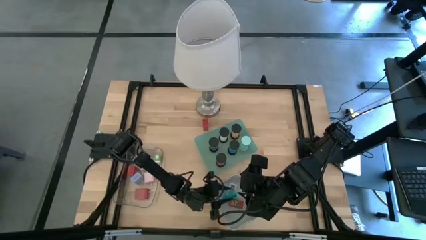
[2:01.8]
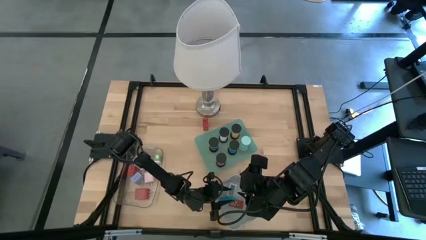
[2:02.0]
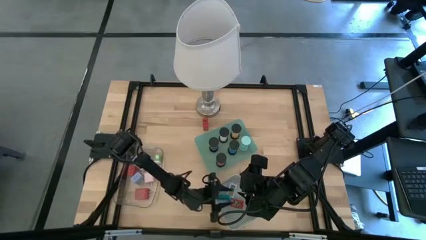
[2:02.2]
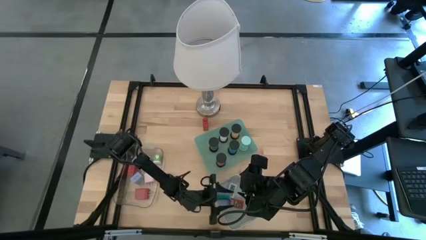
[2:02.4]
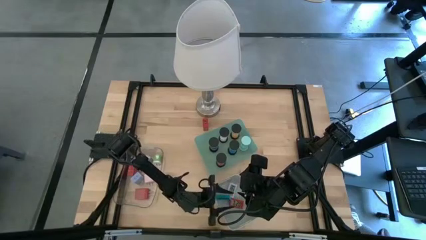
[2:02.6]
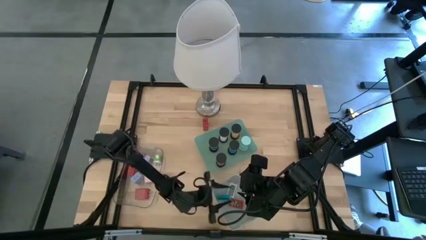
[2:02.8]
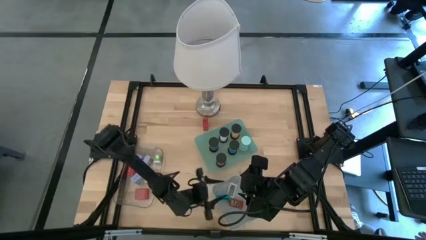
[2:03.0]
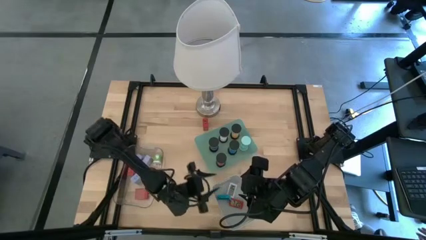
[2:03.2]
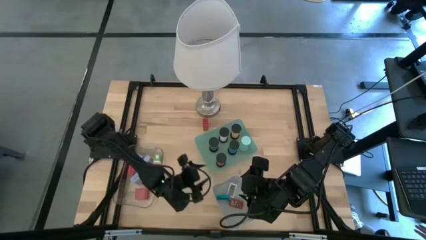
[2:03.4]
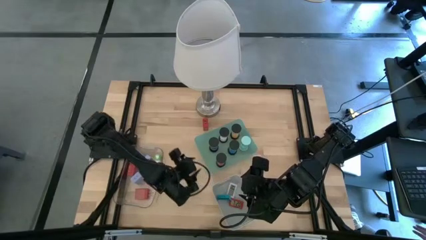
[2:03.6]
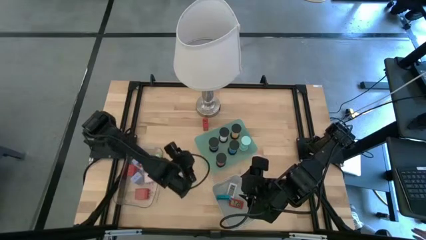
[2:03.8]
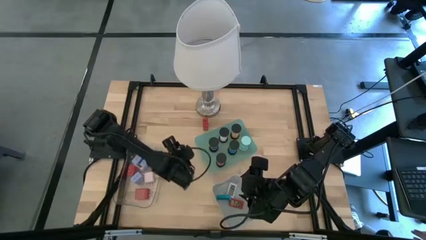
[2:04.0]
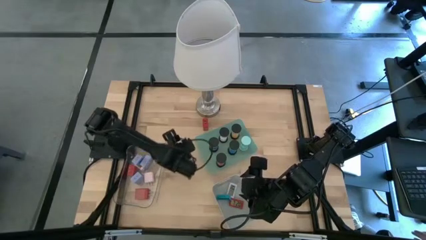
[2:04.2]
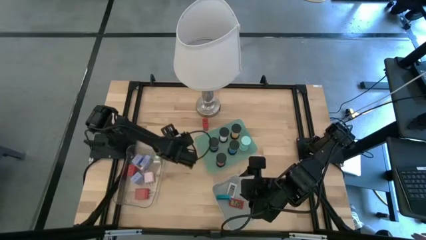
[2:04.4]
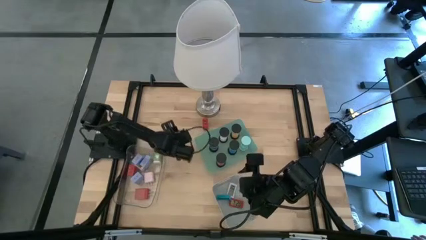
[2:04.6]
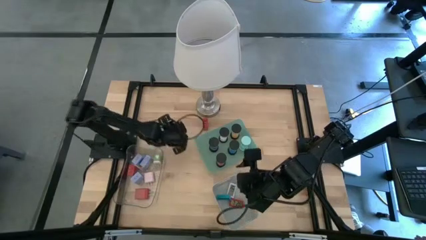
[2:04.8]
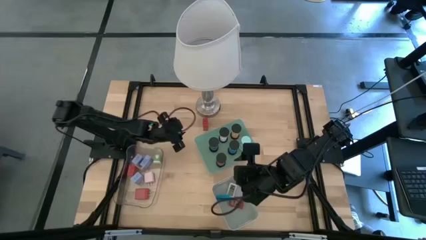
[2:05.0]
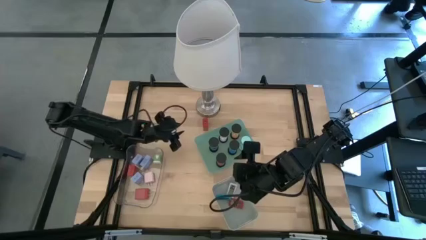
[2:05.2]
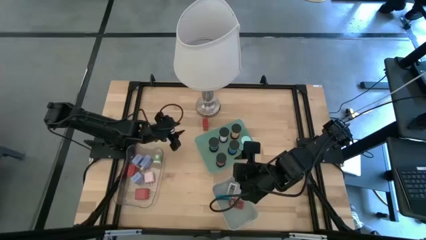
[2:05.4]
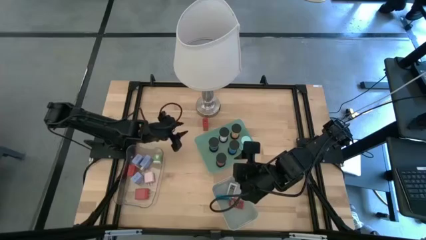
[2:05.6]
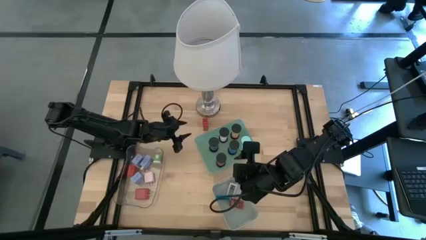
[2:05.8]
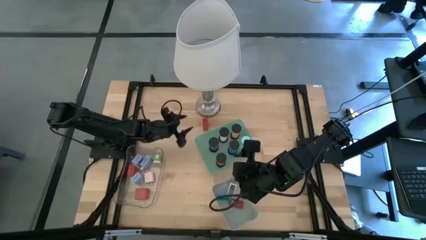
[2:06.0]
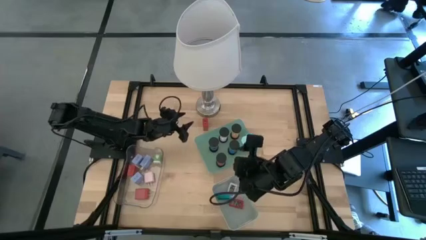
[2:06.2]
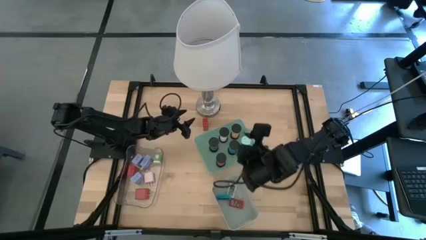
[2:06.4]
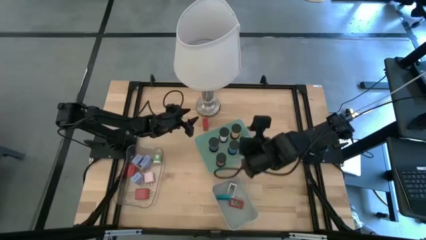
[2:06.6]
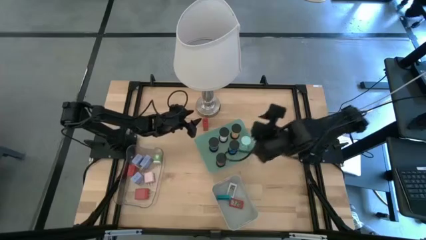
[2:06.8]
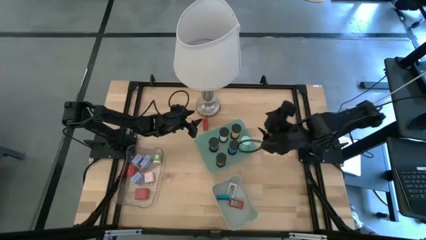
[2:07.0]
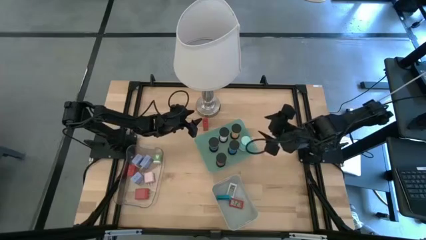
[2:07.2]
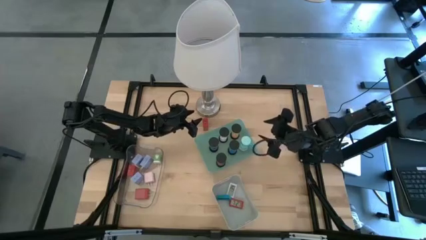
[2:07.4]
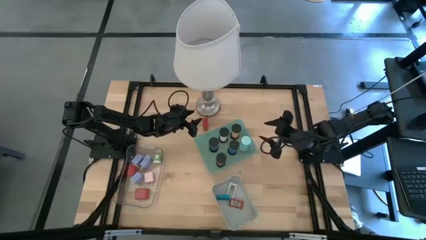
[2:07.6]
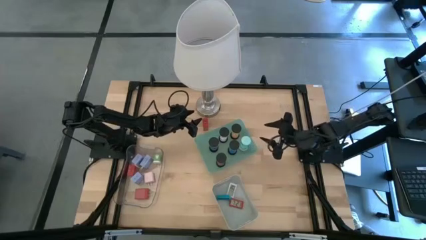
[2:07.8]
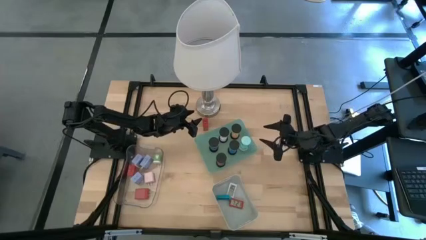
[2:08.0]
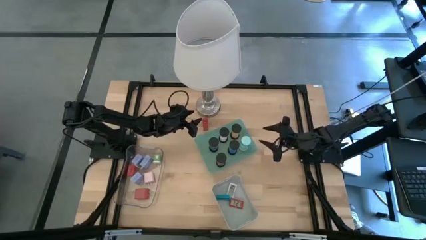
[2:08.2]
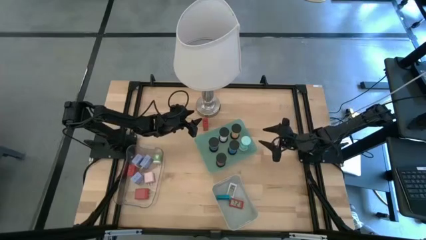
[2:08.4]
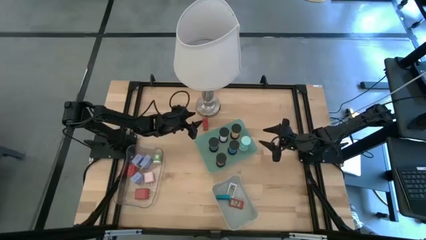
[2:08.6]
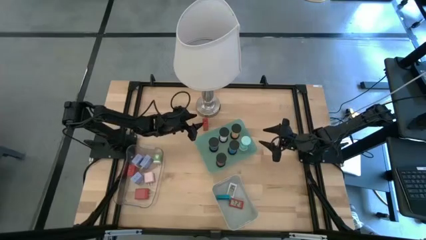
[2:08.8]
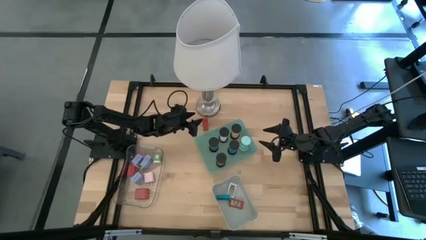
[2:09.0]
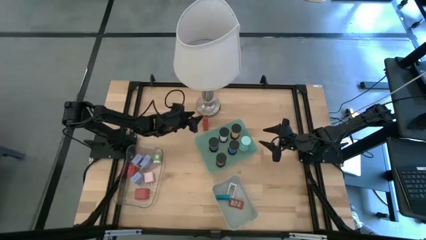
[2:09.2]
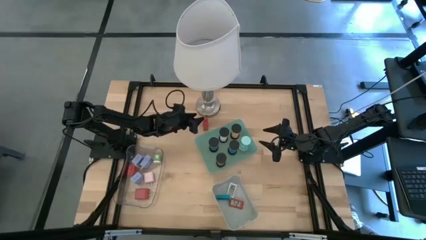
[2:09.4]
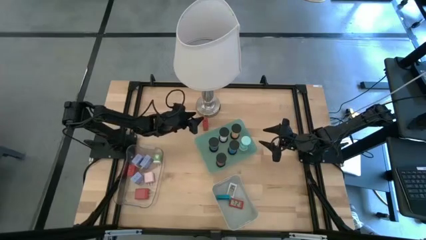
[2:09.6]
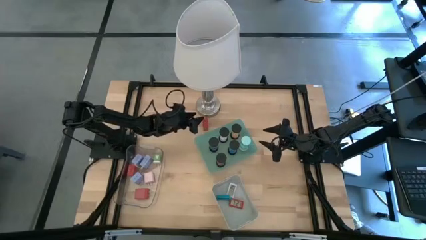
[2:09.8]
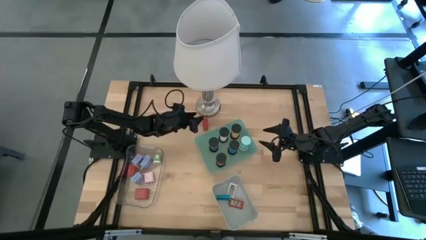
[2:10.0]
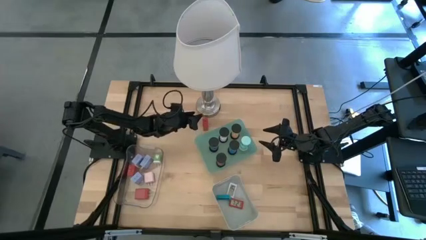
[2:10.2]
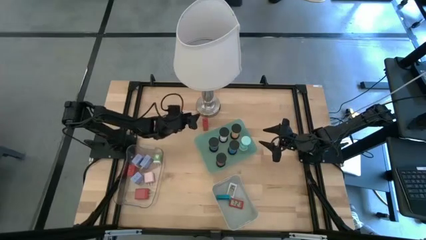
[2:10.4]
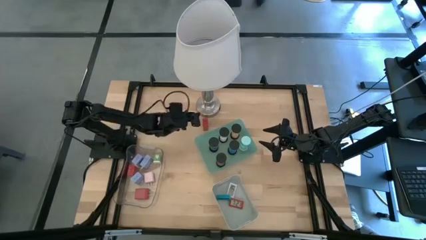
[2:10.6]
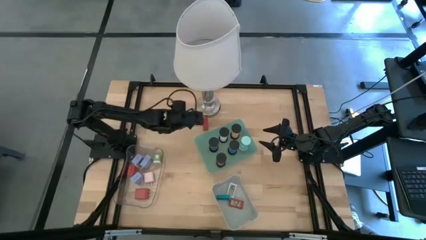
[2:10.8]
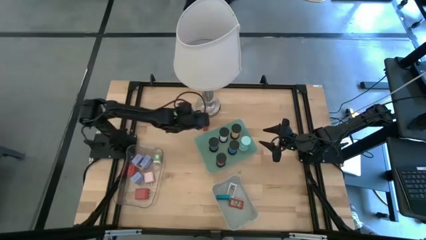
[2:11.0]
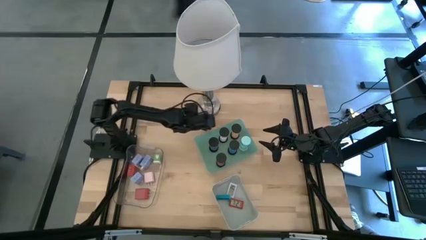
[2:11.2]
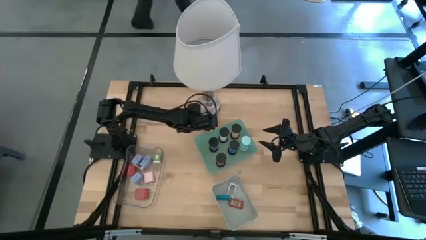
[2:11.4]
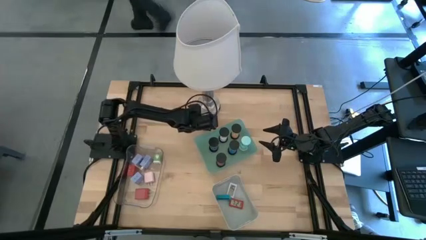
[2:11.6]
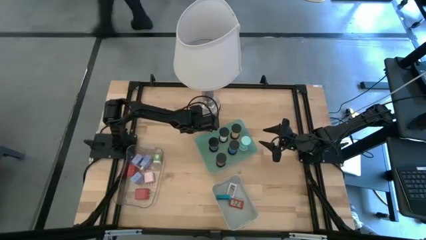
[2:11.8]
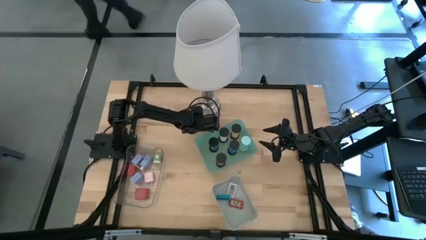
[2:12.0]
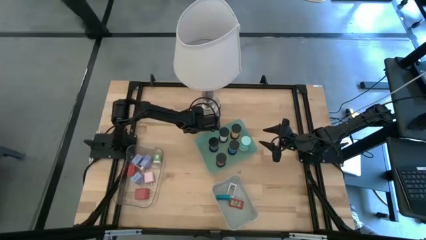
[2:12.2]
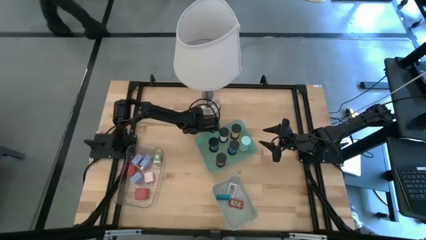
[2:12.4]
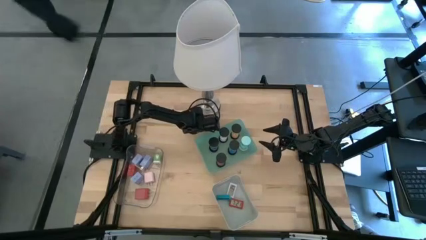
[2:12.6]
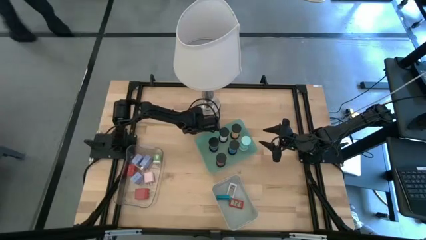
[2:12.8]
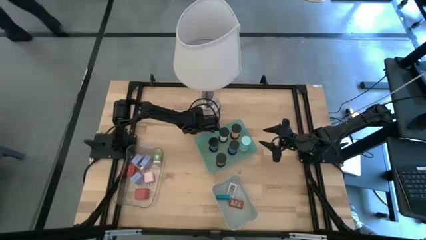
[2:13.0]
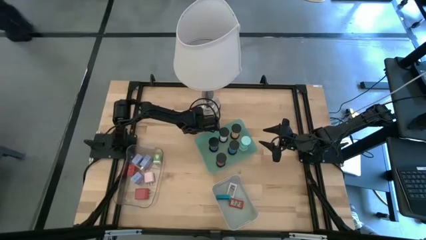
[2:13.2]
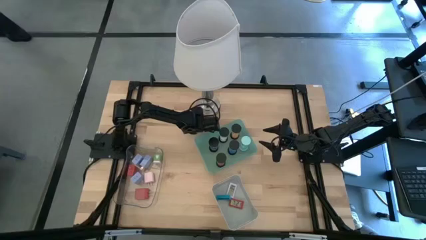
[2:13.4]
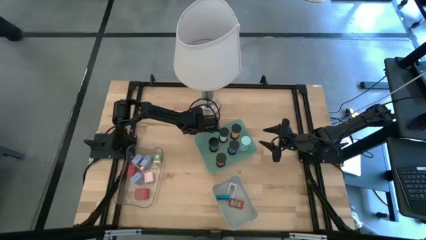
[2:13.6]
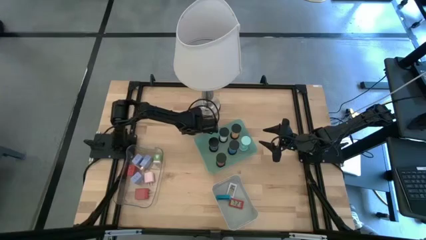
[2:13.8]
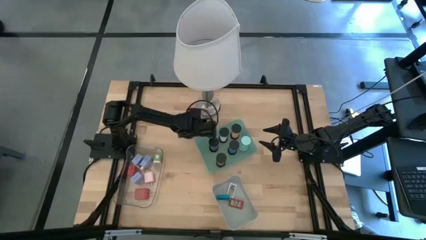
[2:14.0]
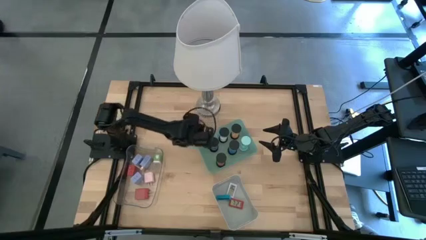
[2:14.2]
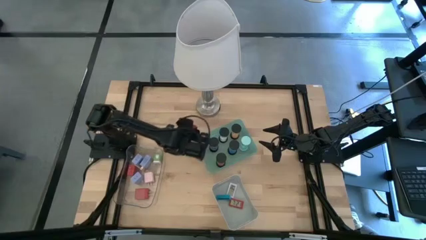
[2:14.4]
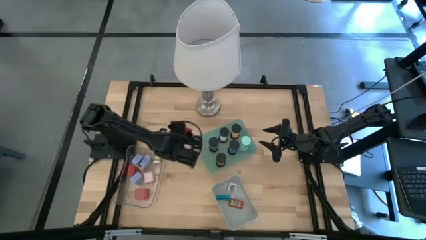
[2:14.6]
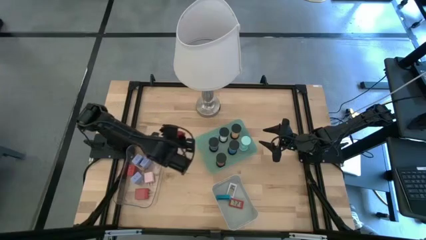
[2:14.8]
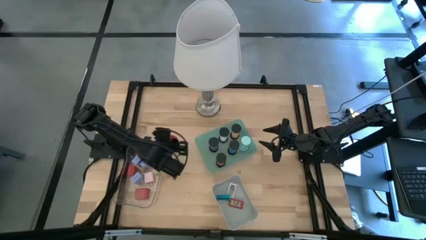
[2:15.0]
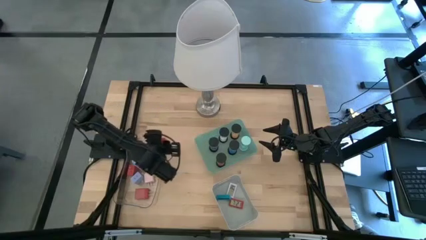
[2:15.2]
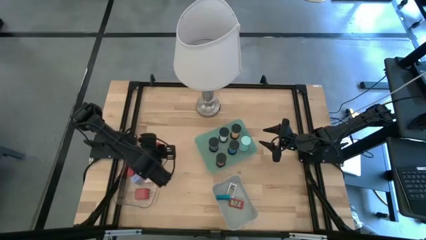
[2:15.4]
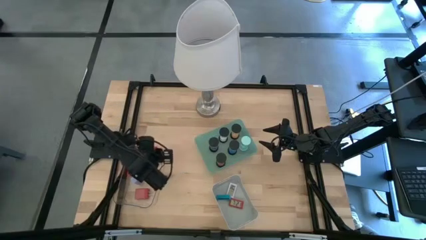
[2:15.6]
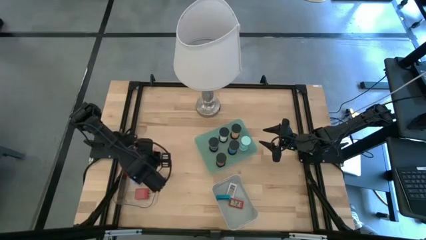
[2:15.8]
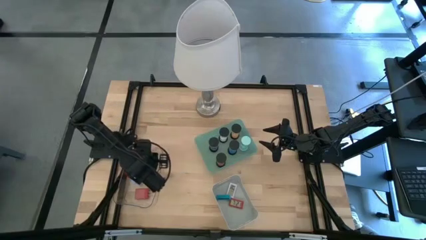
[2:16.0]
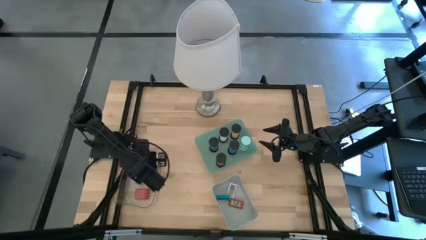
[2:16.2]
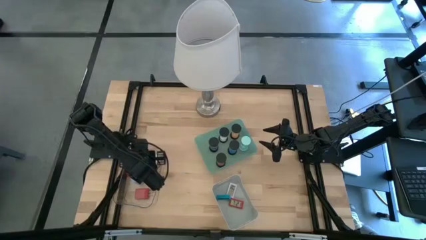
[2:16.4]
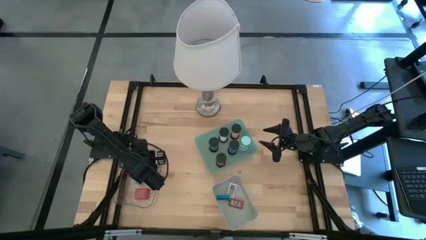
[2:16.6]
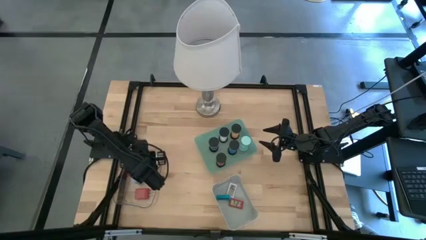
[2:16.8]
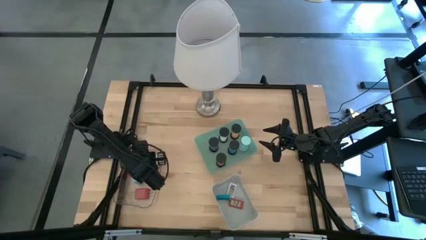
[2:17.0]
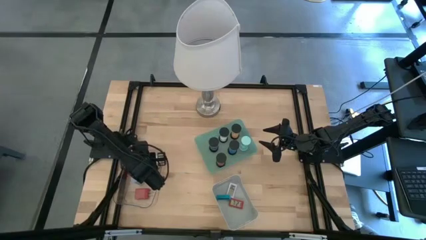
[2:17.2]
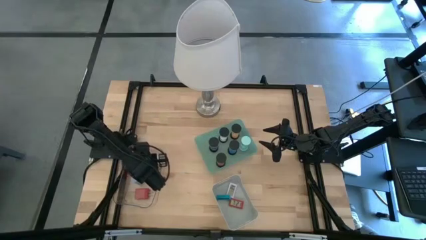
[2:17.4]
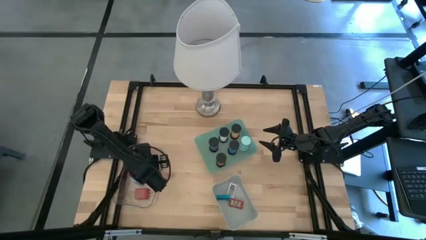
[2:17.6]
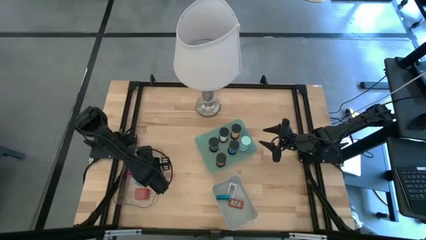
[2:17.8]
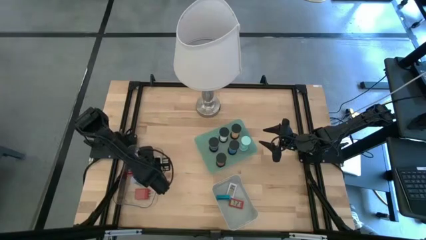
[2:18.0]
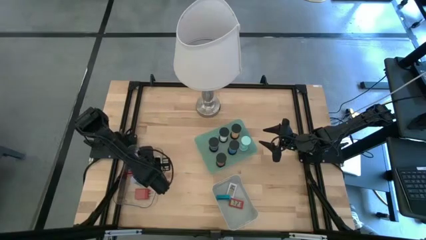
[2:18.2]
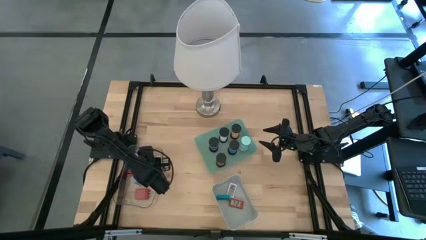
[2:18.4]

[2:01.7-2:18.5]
Task: Pick & Place Office items
Put the red charger adapter into the transparent bin
